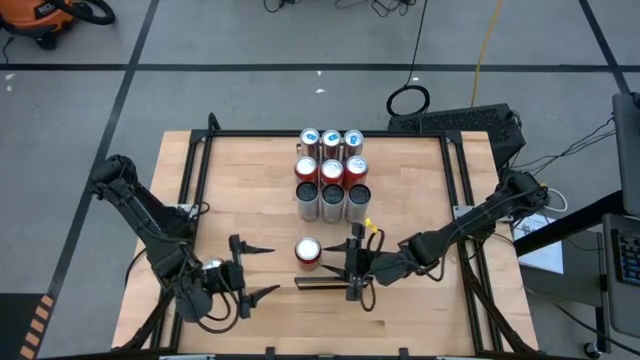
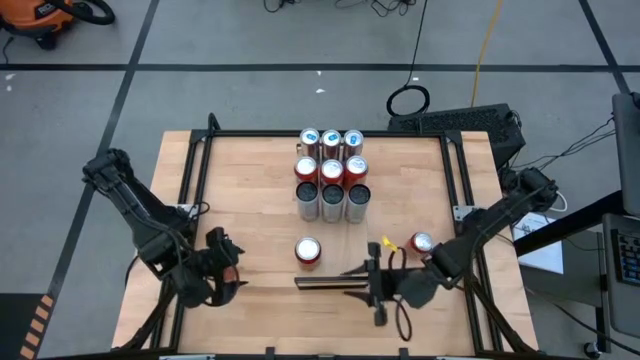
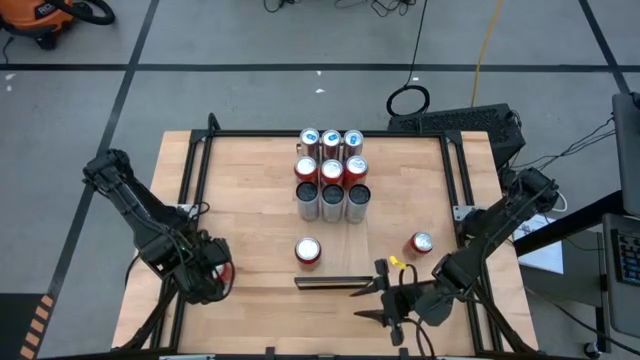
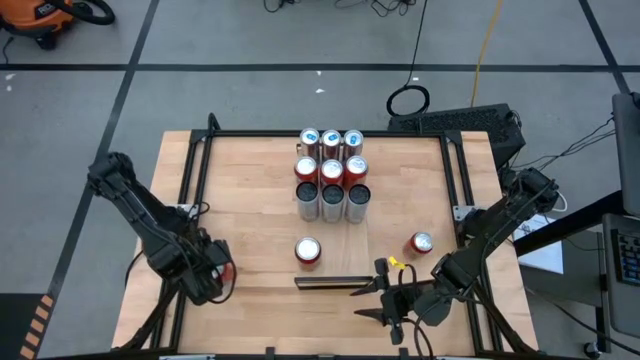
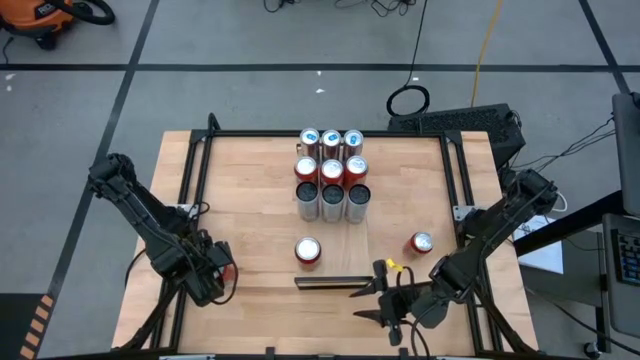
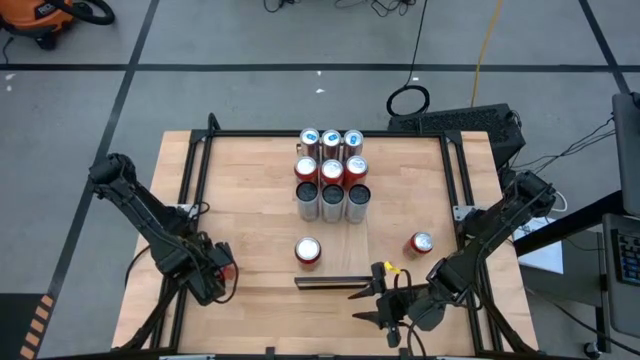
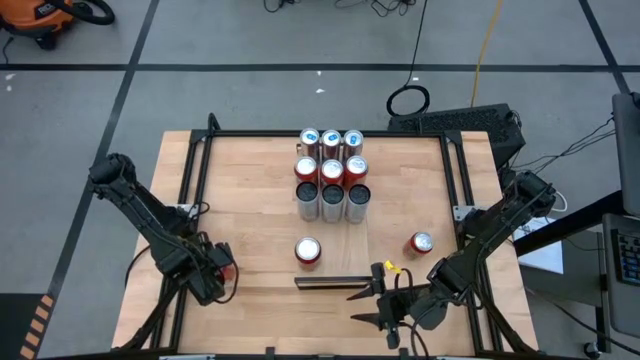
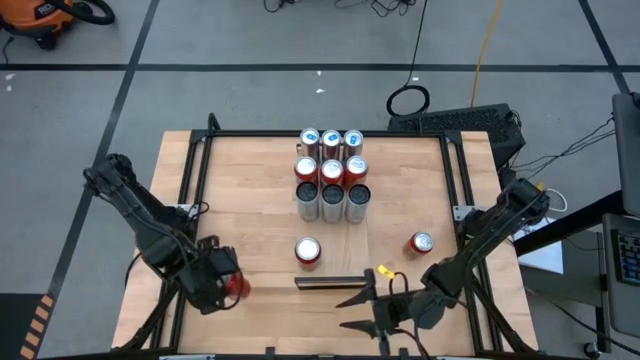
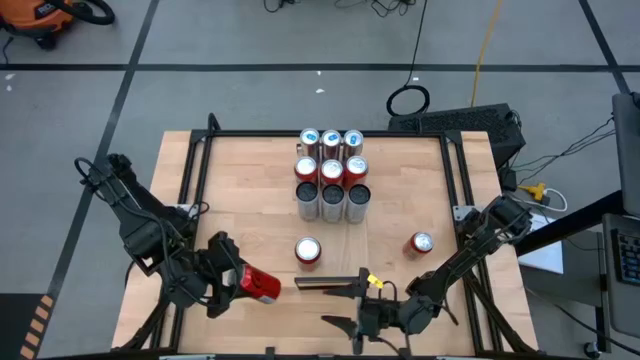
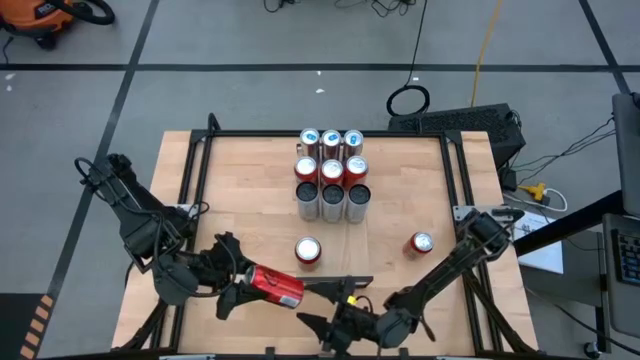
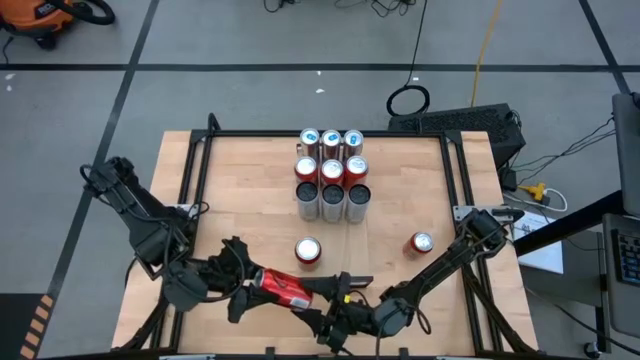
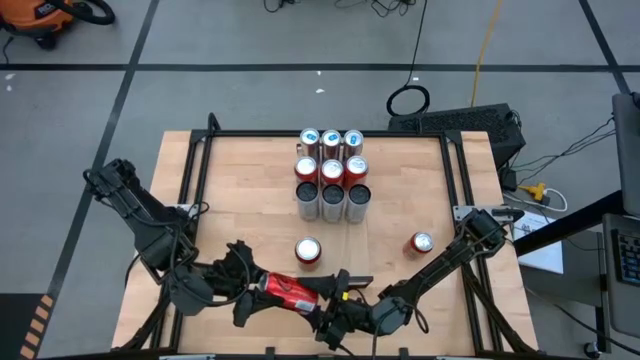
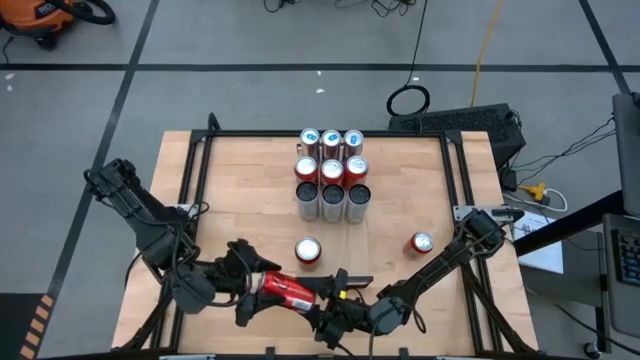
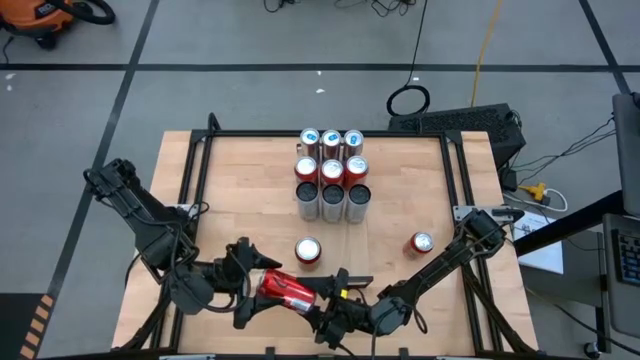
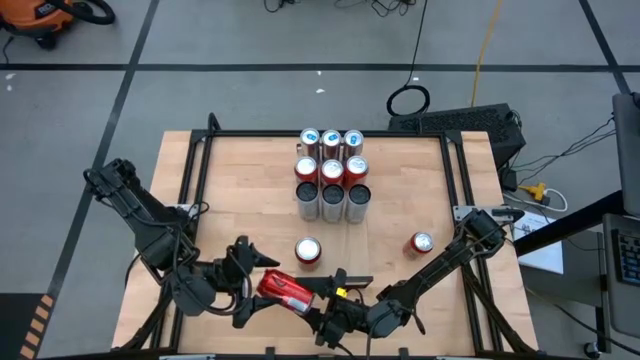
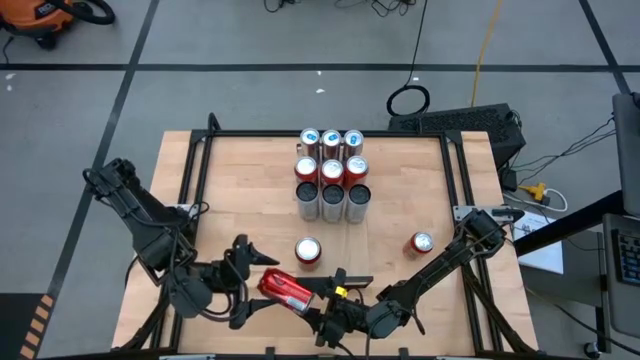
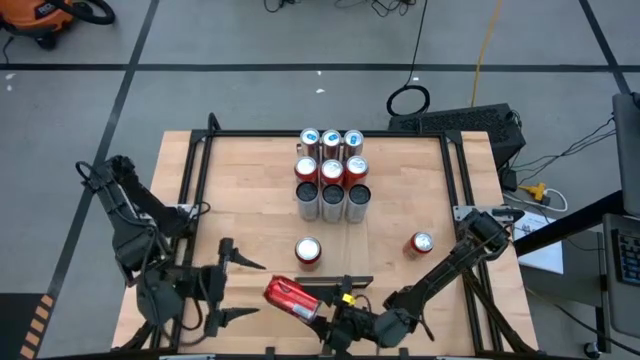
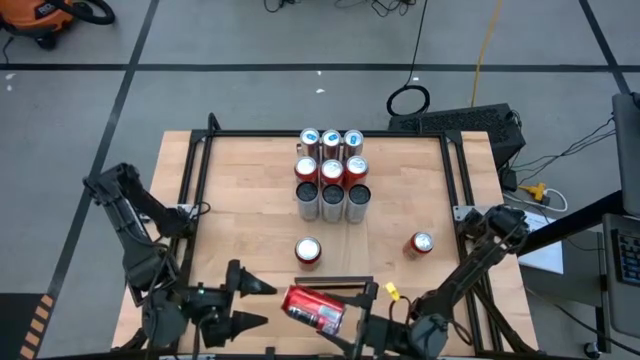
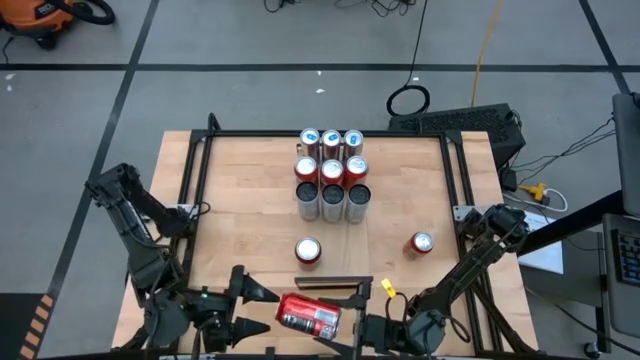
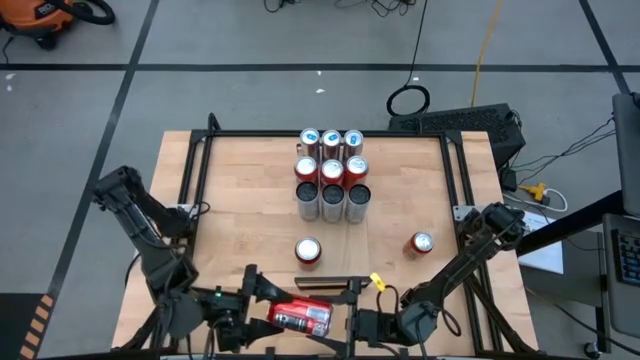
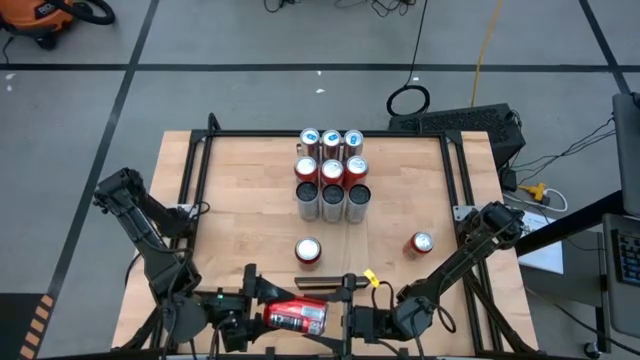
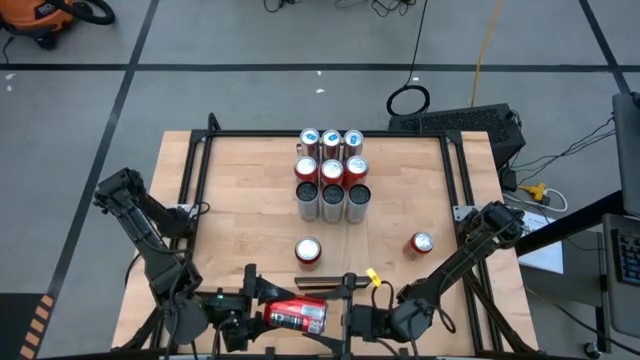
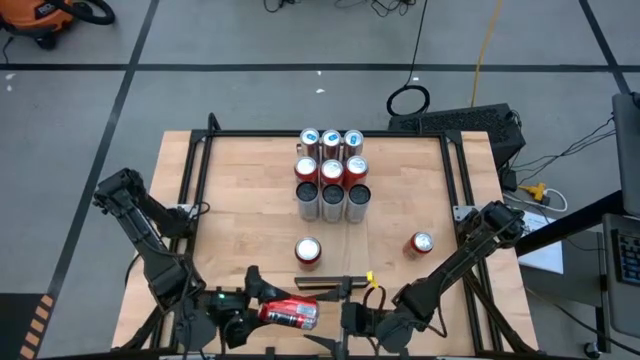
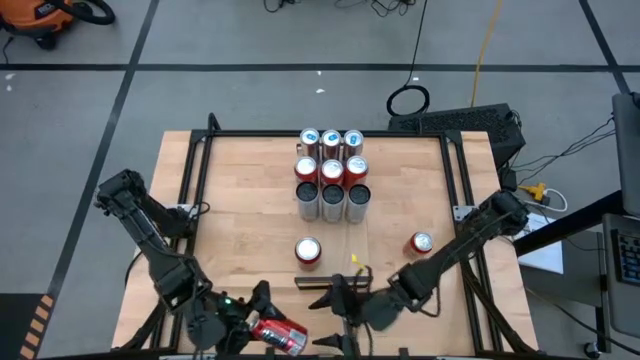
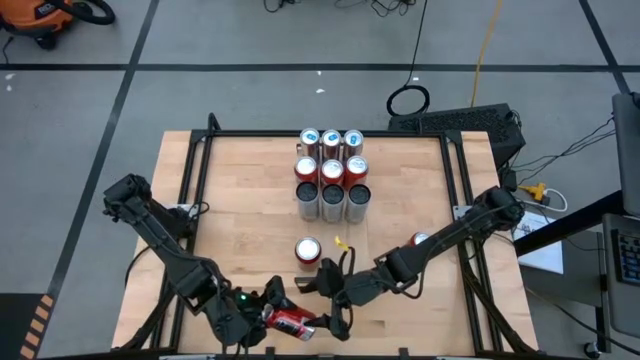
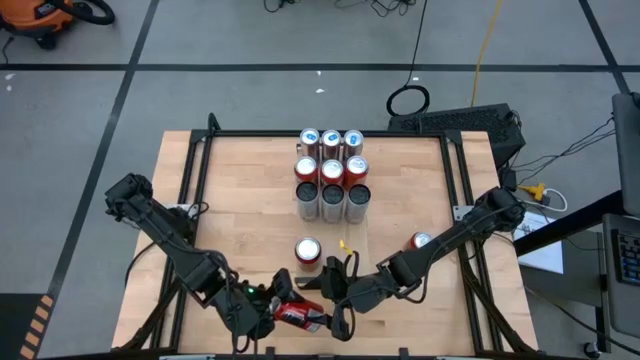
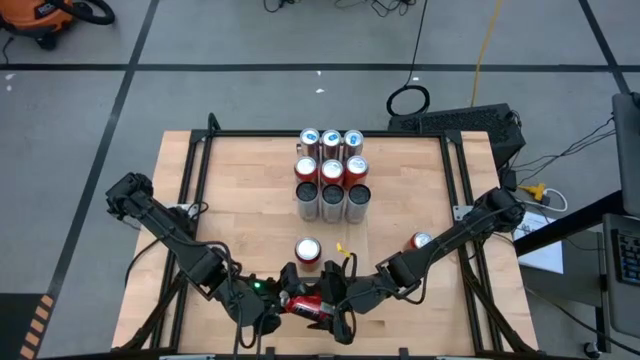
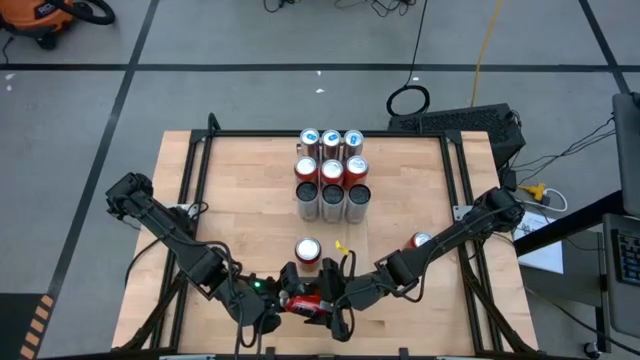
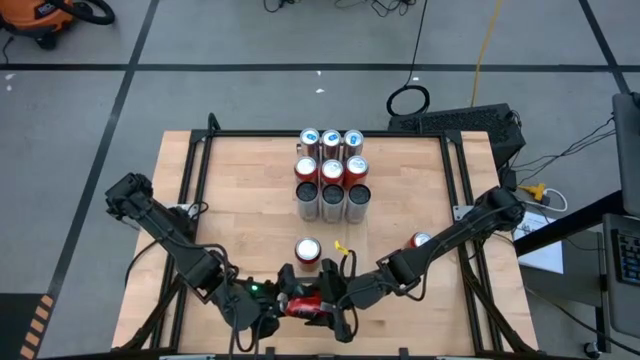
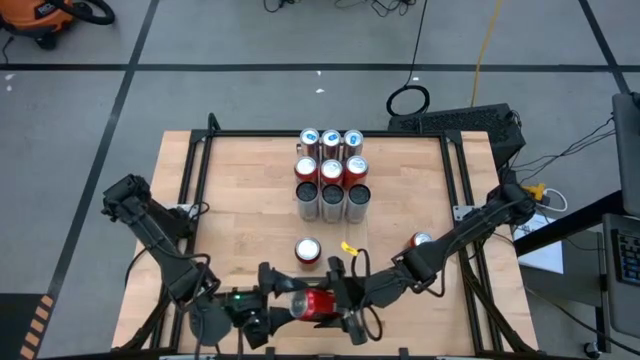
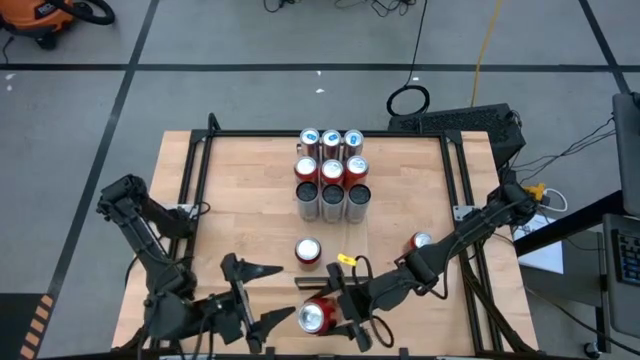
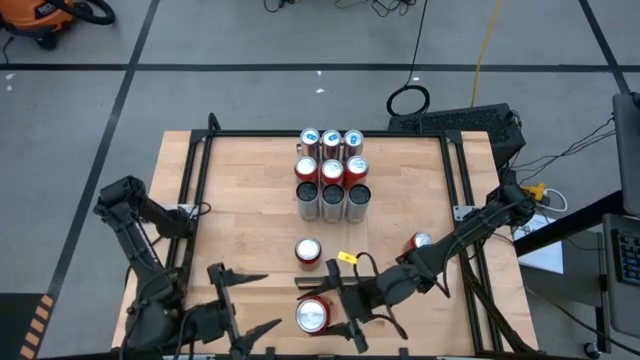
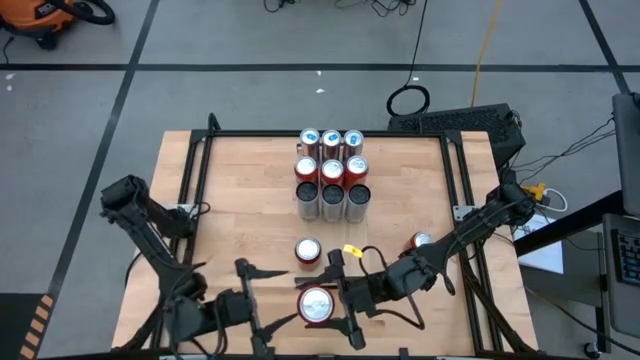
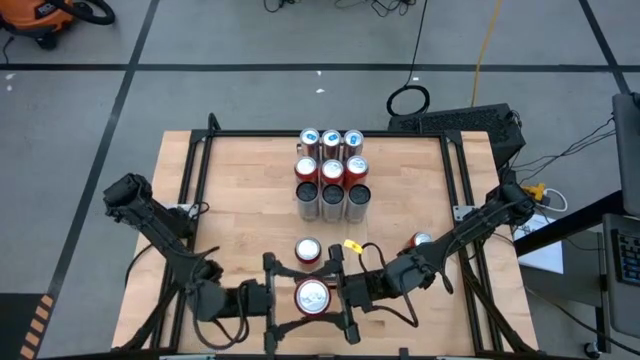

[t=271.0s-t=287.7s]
Task: Place canned beverage on shelf
Put the left red black soda can on the shelf aligned with the other red black soda can

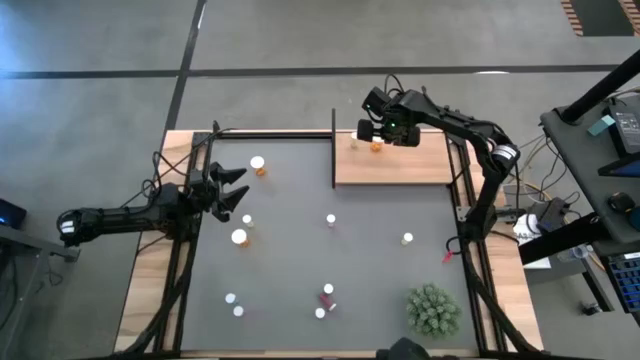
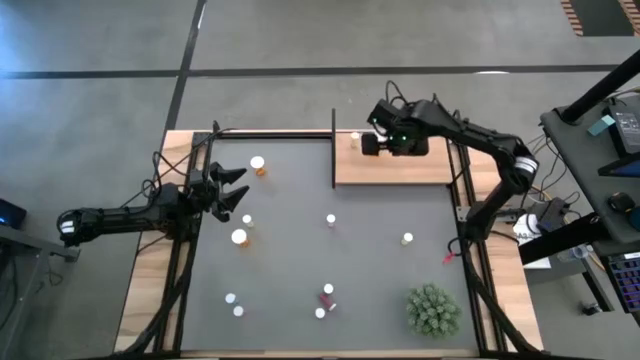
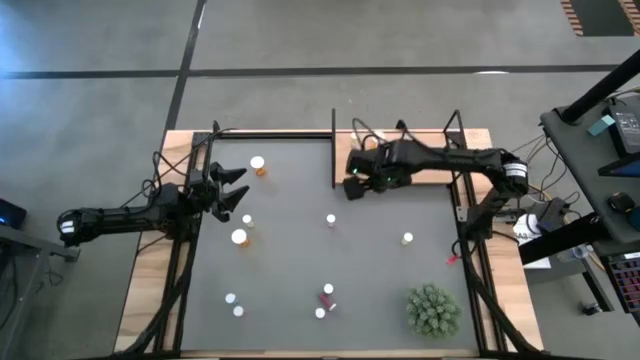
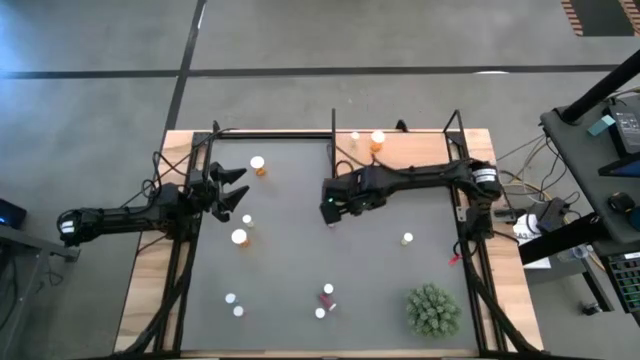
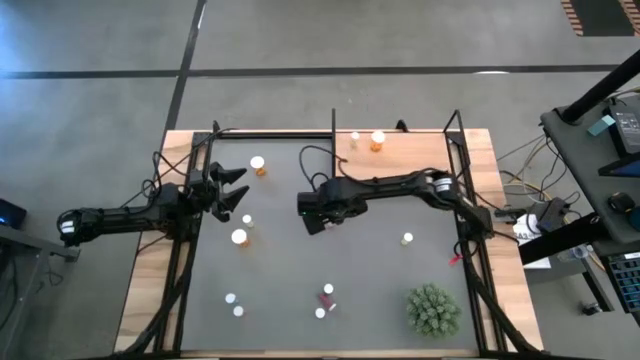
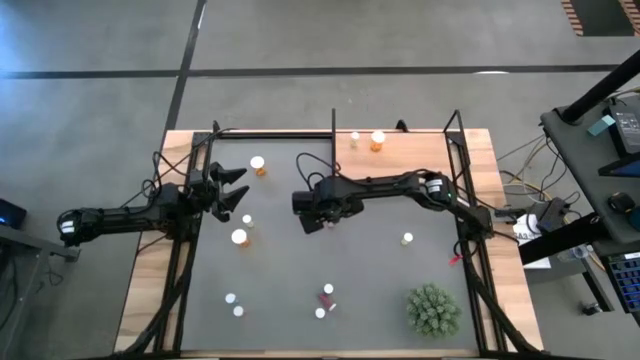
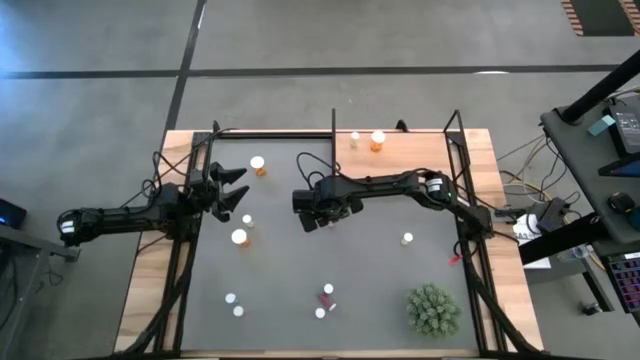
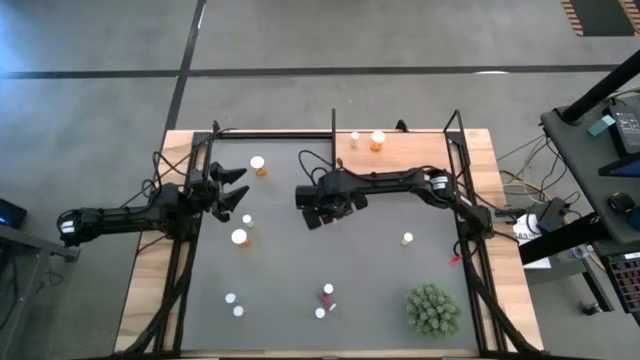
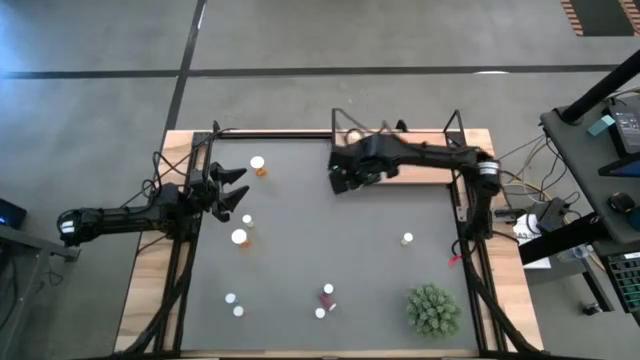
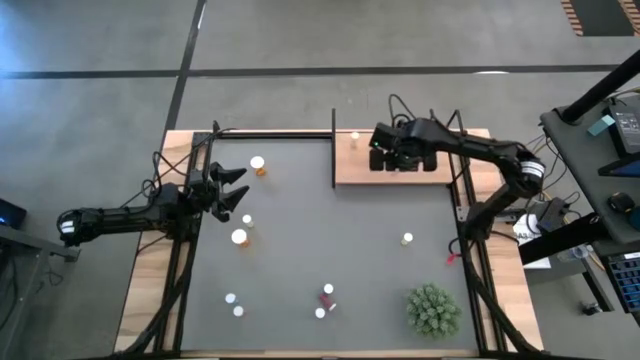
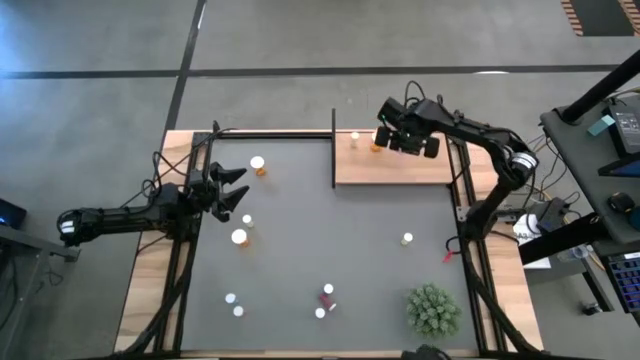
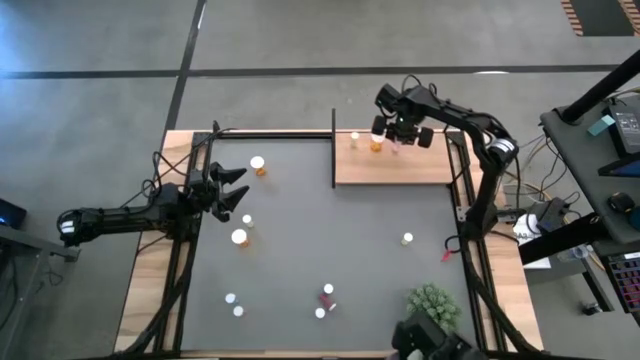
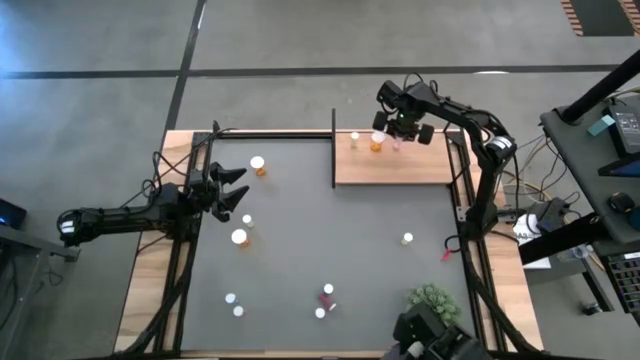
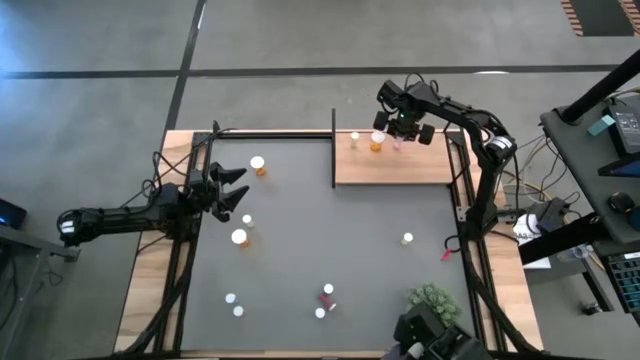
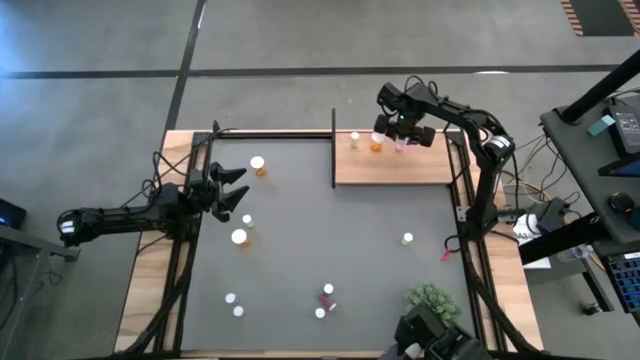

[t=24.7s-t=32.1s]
Task: Pick and place medicine bottles onto shelf by color
Put the top pink medicine bottle on the shelf
